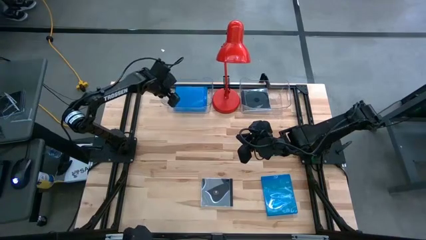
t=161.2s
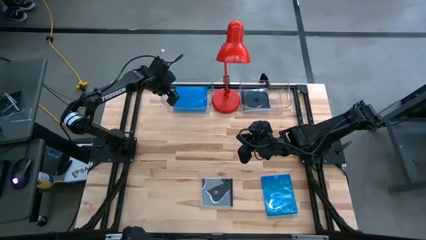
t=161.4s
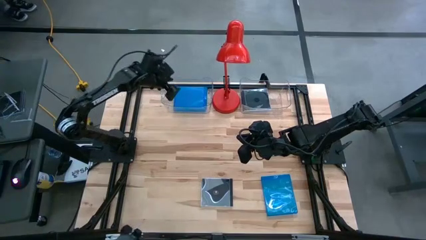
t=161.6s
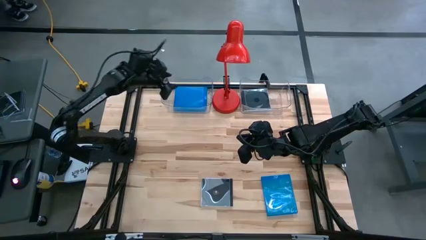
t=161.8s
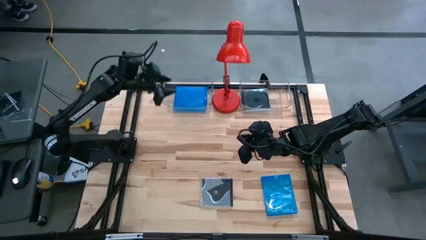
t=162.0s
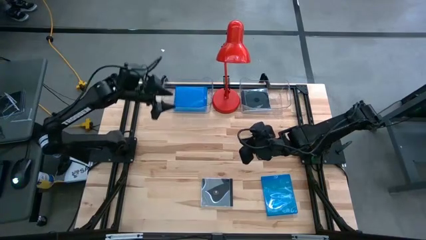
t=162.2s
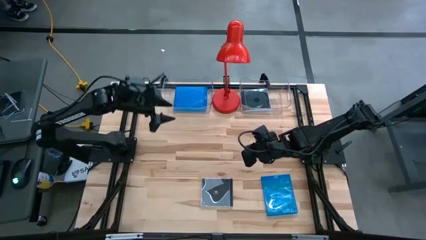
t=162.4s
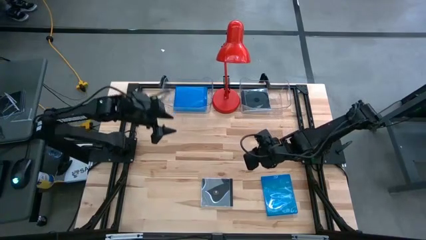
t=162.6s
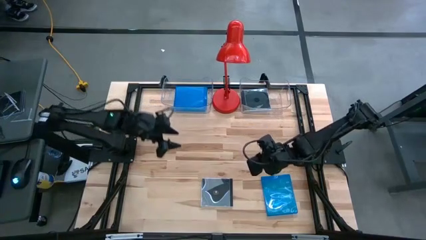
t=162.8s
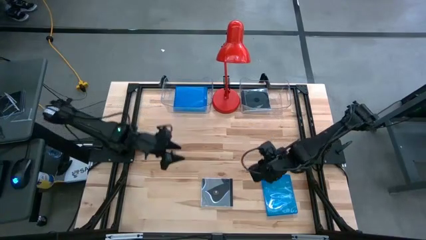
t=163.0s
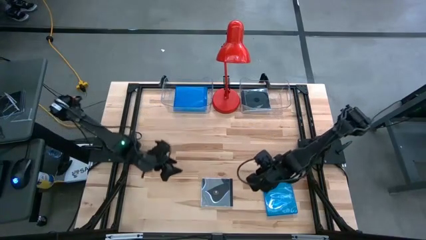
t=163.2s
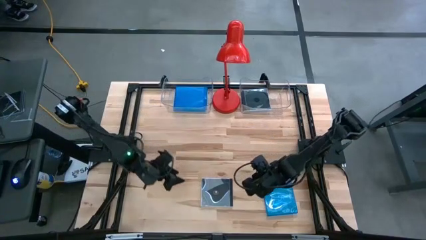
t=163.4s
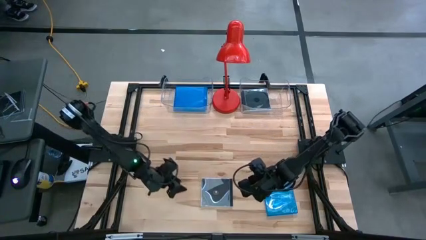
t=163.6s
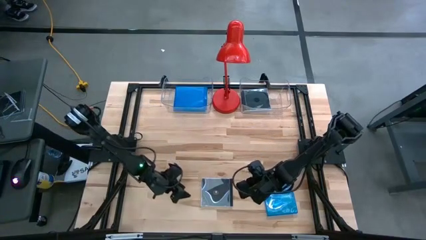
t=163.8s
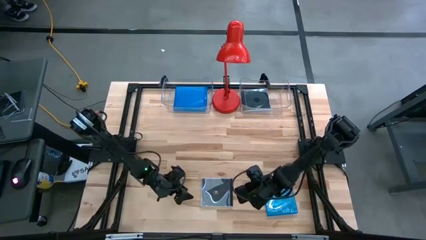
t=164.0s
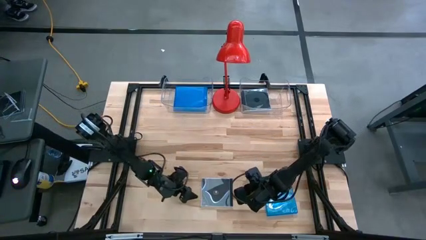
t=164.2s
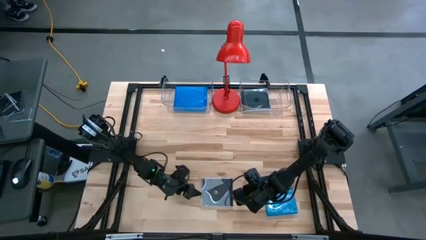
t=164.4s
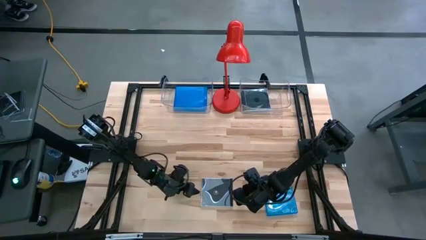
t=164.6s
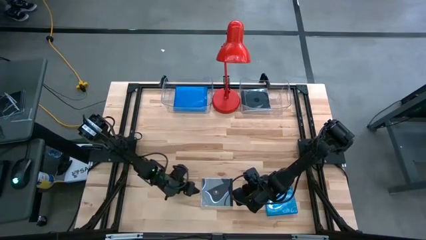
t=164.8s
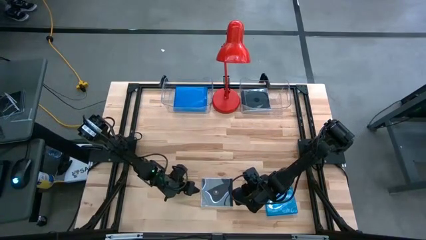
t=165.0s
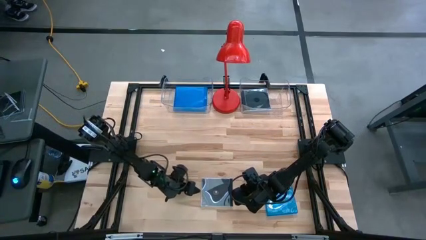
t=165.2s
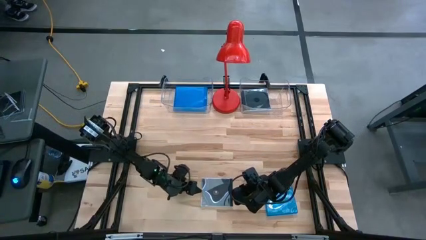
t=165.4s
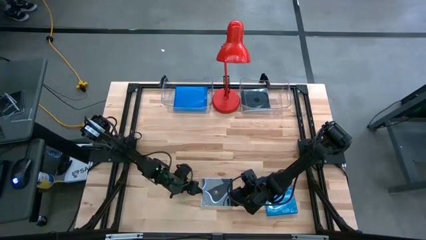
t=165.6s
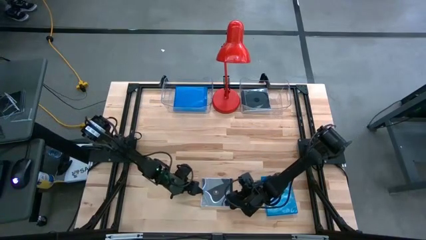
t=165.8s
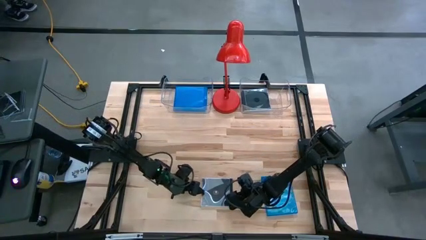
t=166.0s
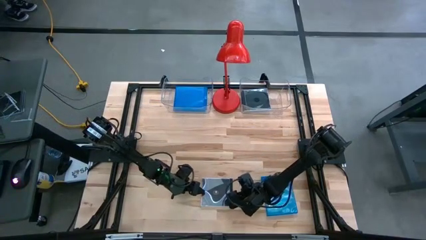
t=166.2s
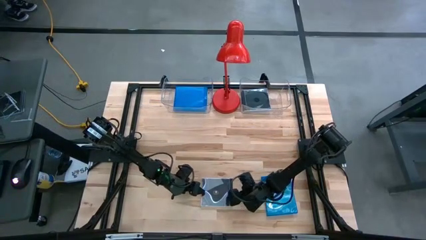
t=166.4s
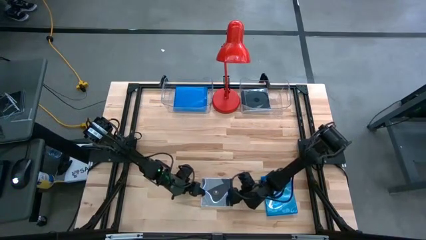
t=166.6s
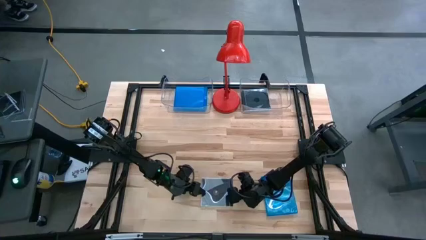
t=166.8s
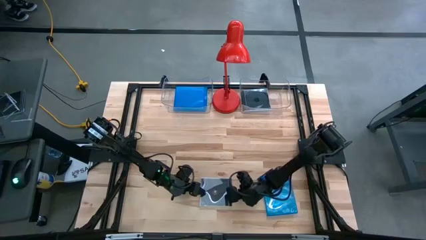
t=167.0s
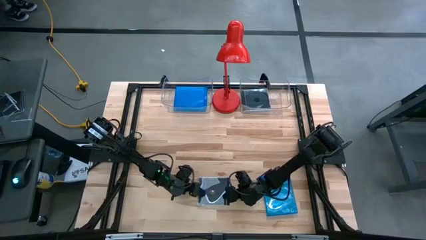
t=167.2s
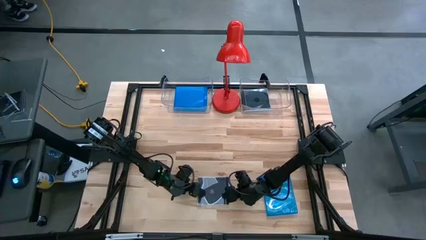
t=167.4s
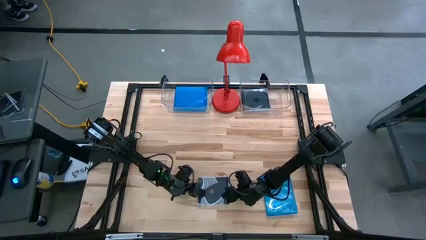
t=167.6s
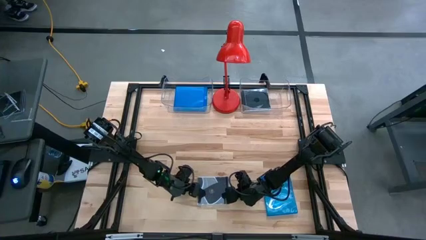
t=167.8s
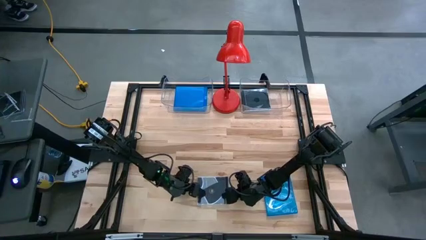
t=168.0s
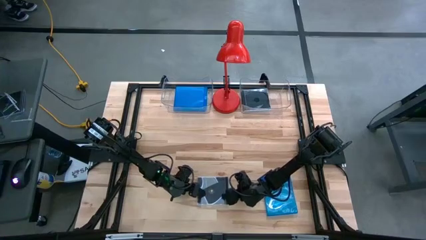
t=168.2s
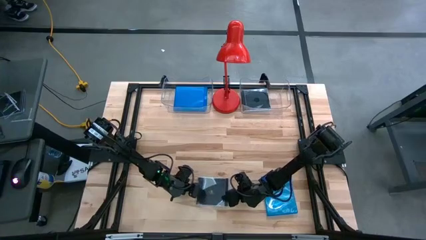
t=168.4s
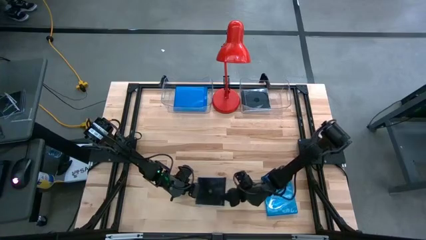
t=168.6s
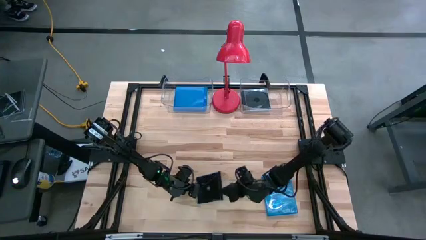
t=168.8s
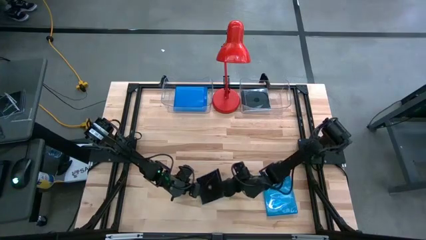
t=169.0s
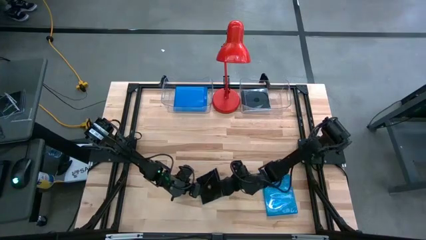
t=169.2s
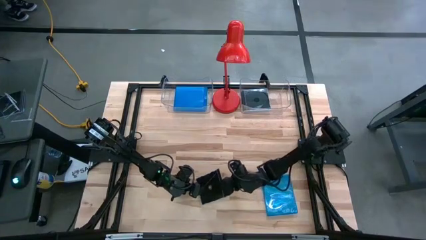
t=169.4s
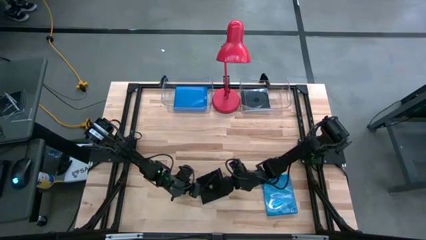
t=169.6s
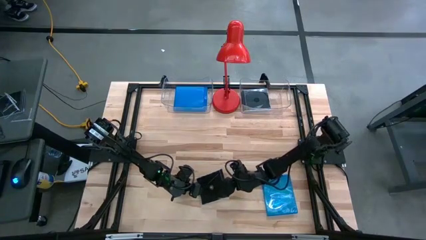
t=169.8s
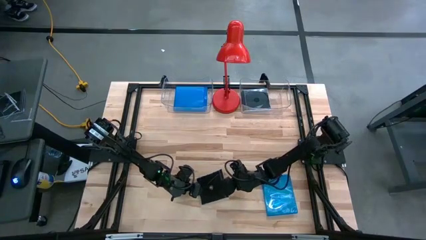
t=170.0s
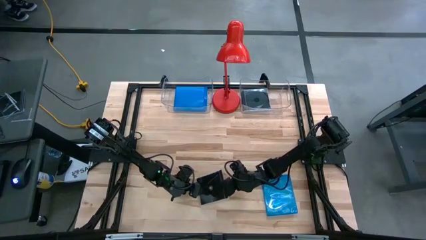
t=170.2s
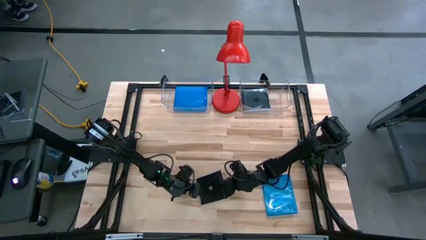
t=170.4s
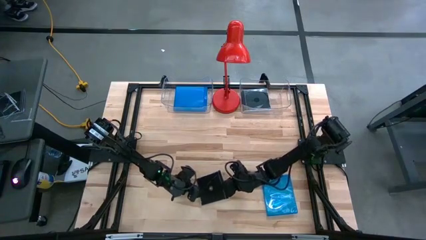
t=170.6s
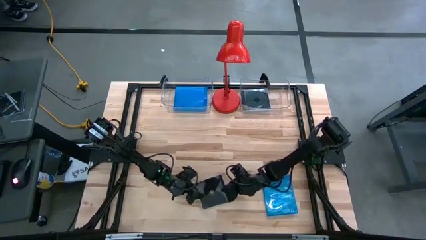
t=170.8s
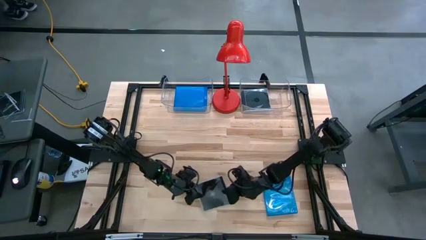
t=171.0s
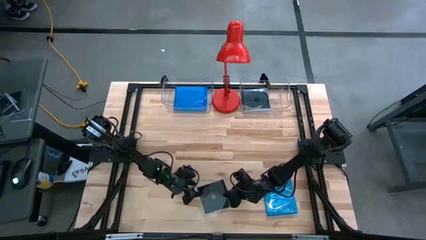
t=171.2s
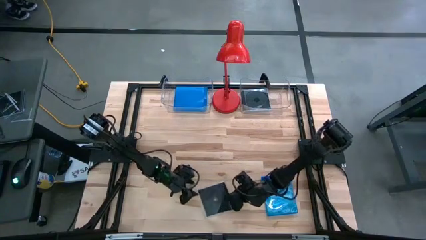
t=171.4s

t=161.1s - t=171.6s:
Task: Pick & place jewel cases by type
Put the black cd case into the right transparent bin

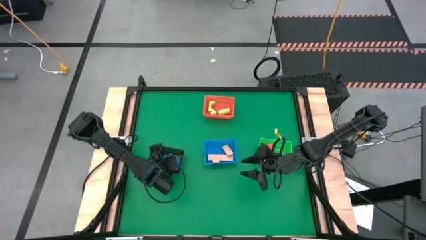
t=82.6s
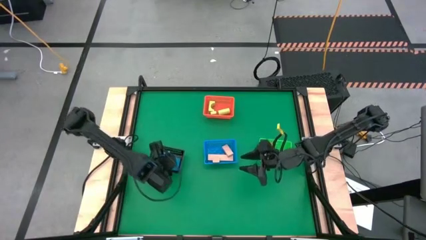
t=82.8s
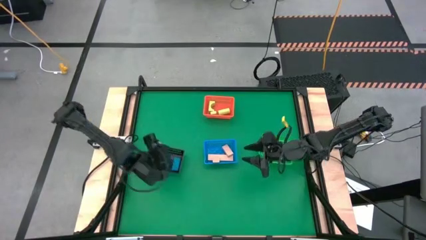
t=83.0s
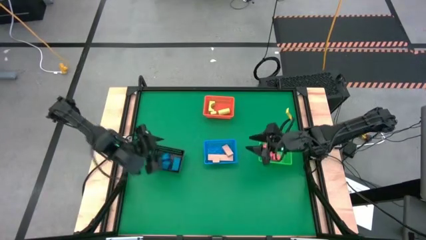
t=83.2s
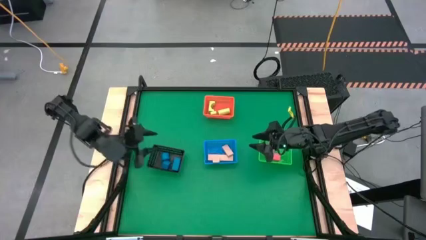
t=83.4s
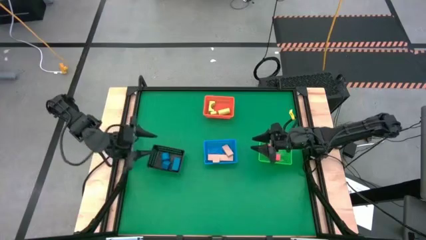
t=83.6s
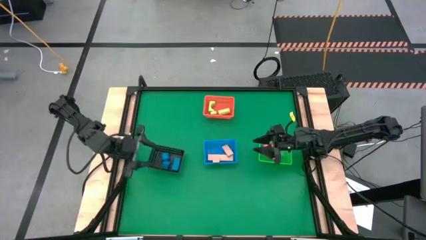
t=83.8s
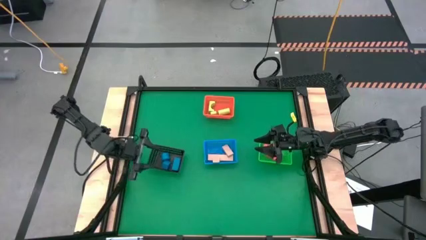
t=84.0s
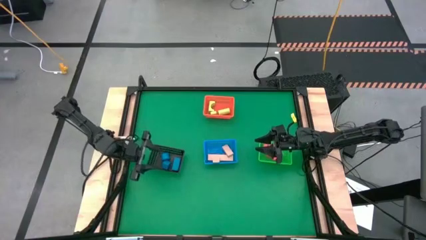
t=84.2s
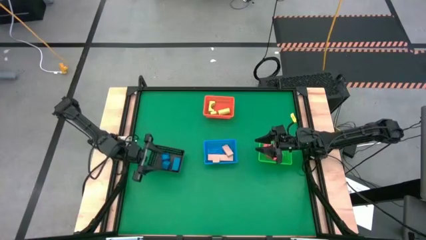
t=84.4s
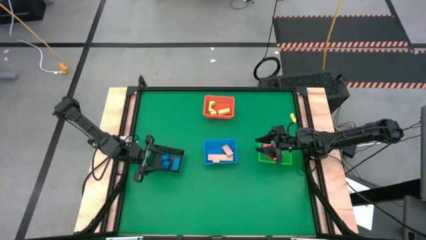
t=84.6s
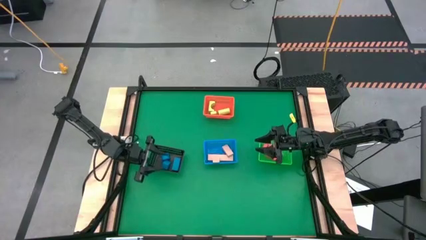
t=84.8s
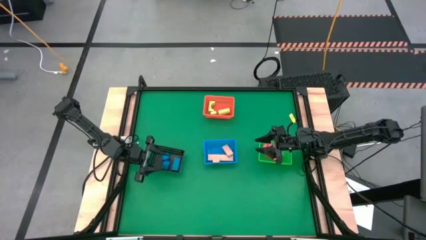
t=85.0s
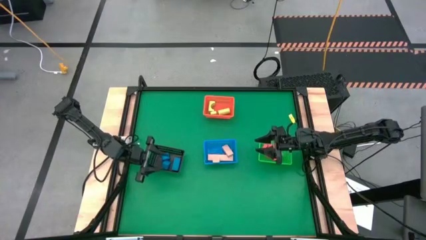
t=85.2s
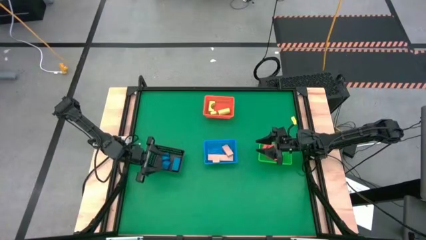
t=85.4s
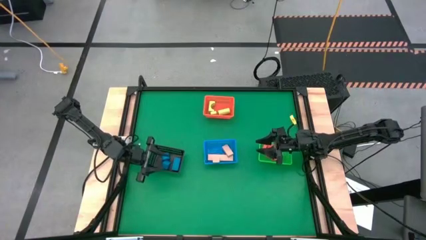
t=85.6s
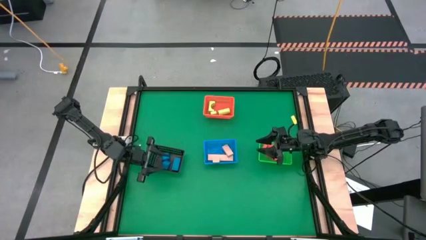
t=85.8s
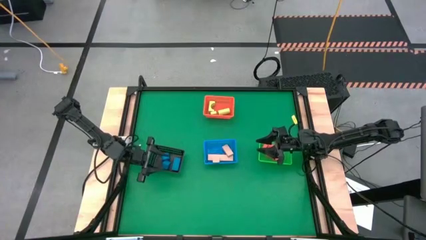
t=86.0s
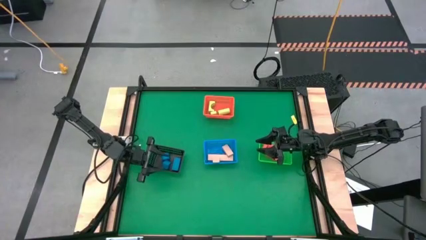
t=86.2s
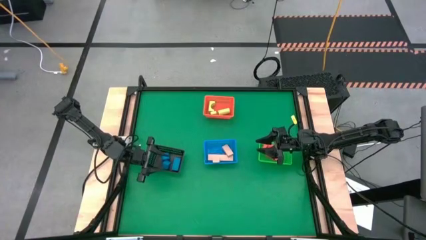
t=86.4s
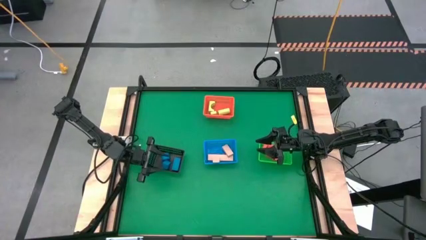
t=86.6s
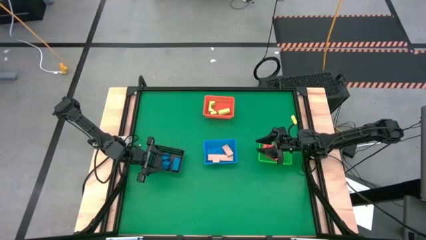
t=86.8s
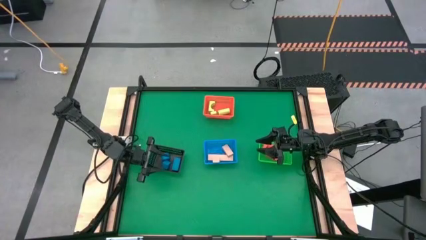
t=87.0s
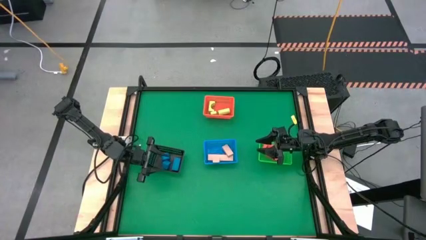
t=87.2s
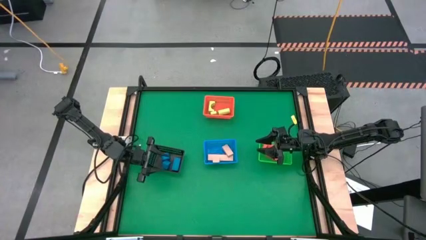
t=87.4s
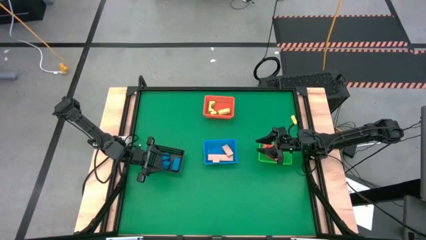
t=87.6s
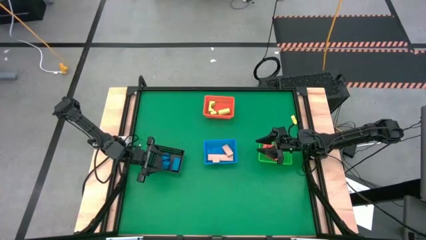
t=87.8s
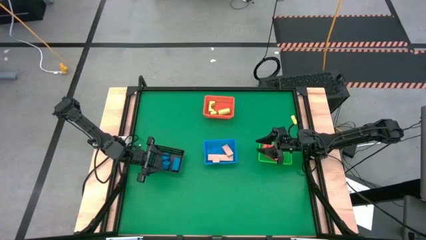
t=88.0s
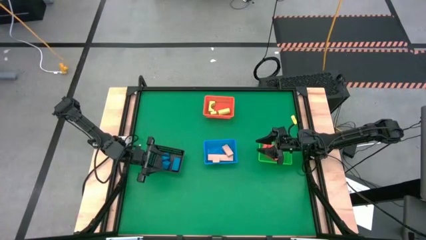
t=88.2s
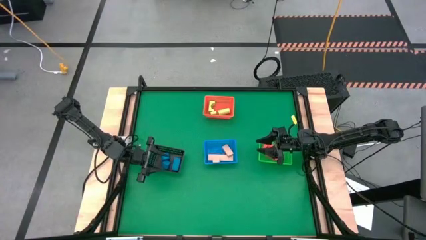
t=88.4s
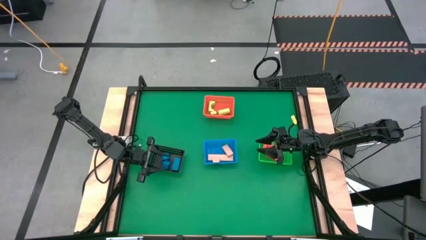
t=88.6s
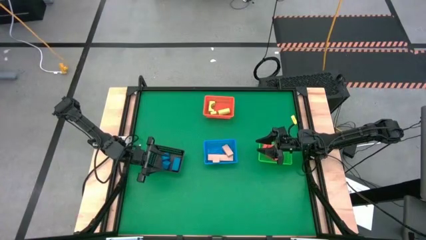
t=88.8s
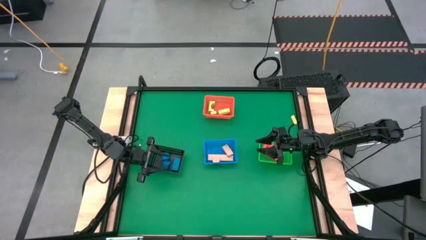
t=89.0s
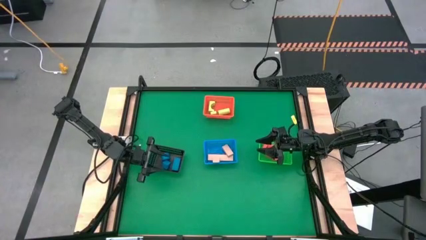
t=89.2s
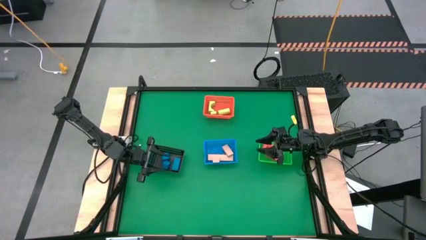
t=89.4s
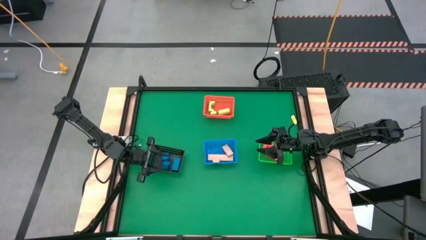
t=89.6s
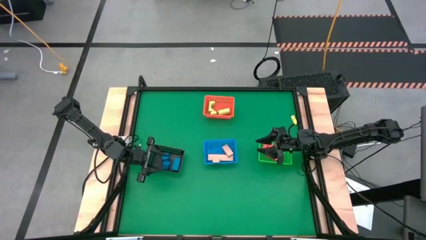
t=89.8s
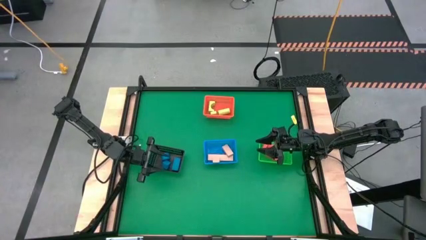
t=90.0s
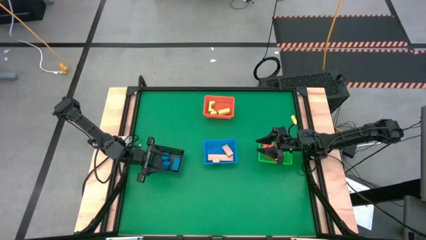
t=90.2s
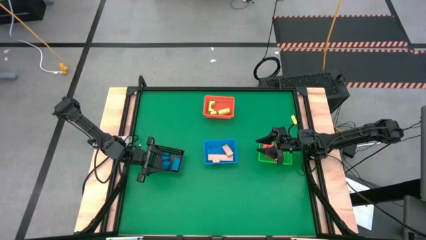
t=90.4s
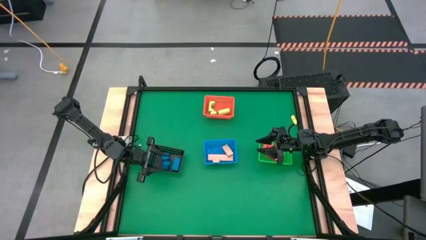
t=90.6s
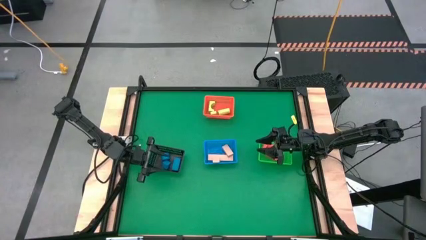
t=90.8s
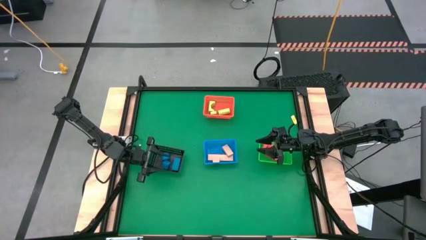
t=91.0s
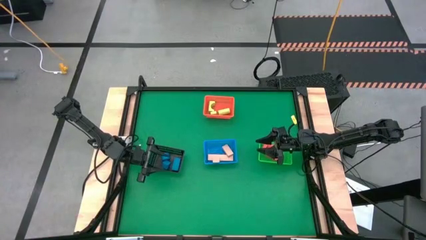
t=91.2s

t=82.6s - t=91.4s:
Task: Sort & place blocks by color
Return to Home Position
